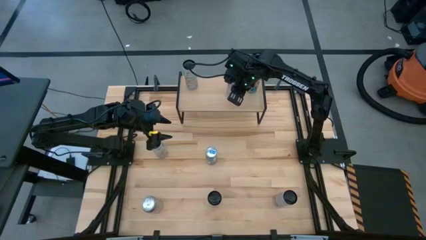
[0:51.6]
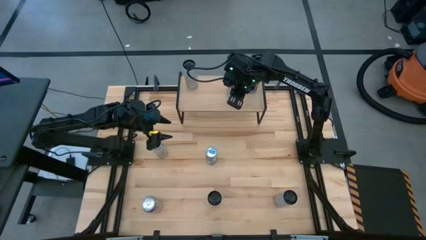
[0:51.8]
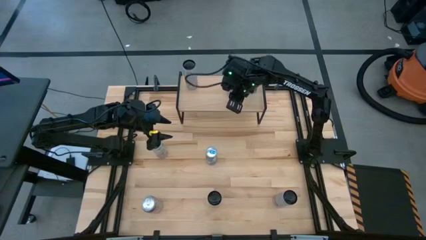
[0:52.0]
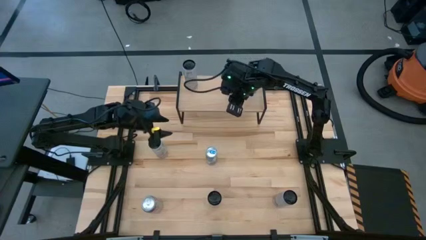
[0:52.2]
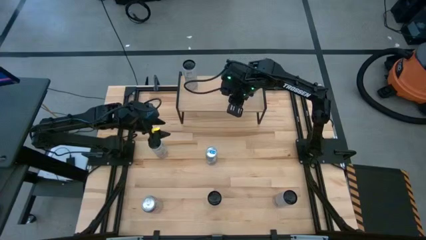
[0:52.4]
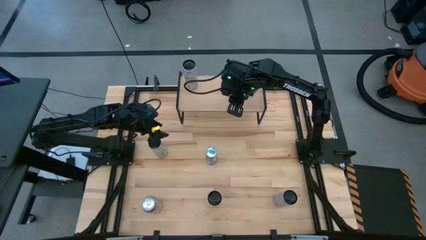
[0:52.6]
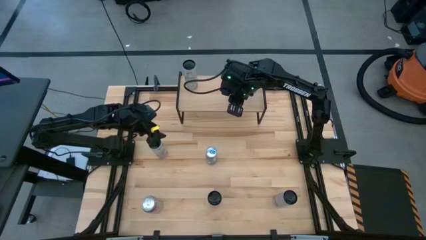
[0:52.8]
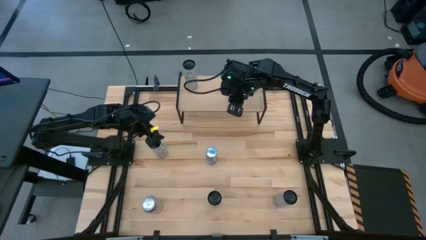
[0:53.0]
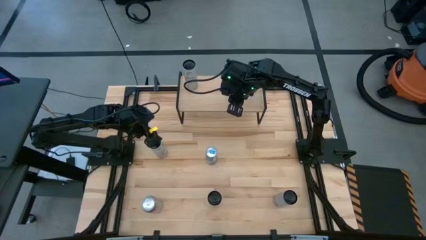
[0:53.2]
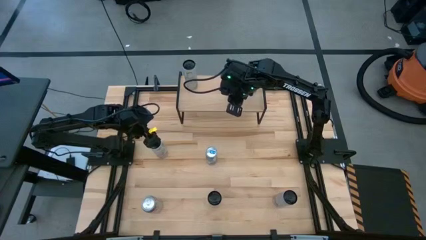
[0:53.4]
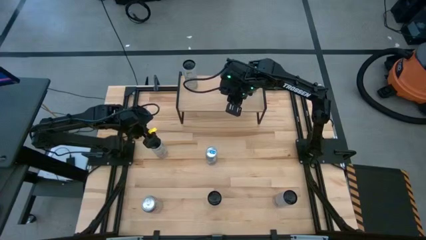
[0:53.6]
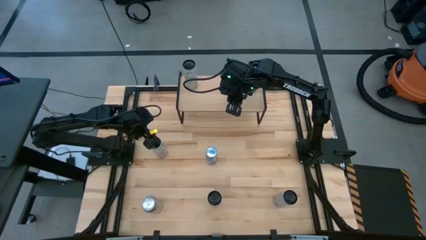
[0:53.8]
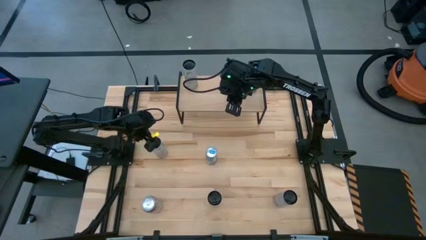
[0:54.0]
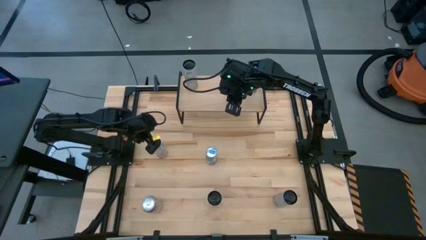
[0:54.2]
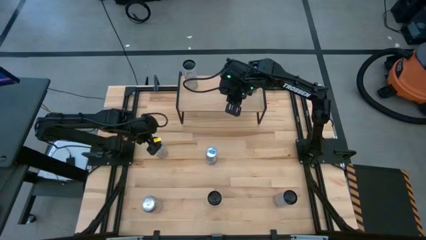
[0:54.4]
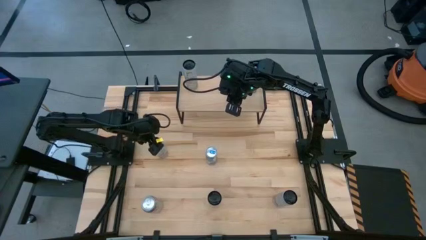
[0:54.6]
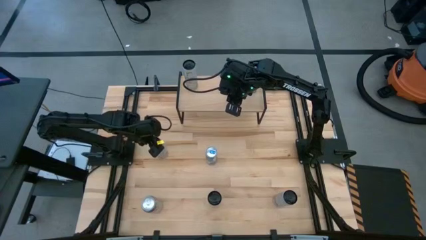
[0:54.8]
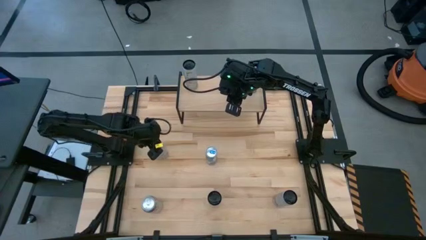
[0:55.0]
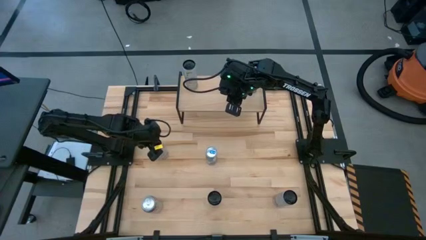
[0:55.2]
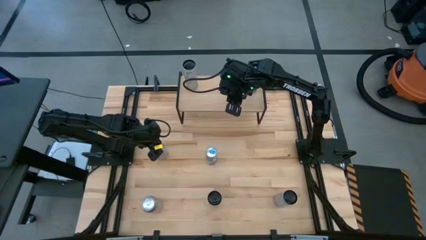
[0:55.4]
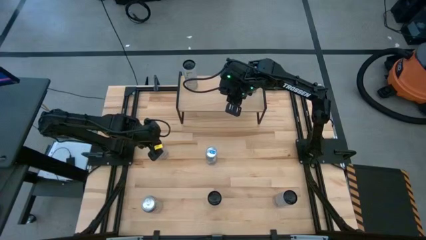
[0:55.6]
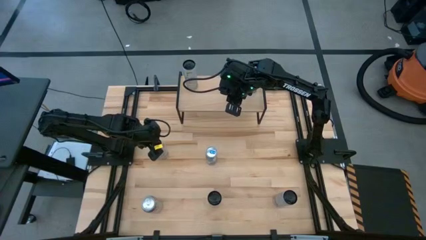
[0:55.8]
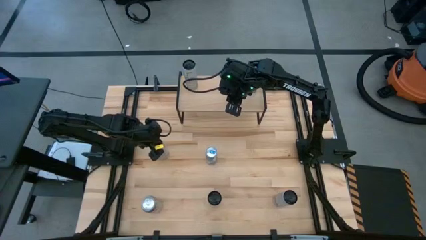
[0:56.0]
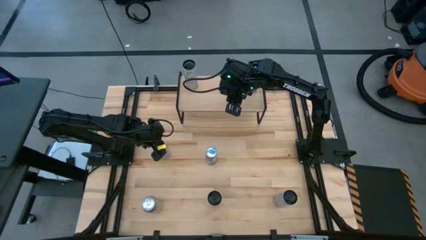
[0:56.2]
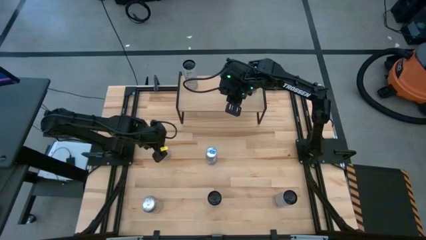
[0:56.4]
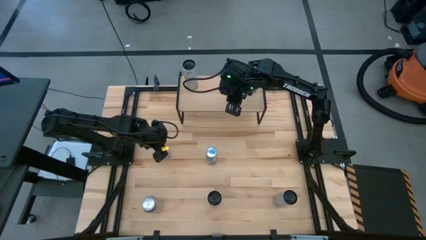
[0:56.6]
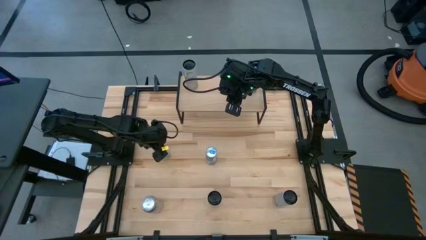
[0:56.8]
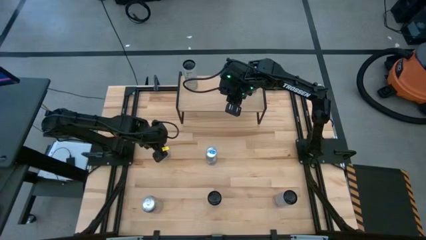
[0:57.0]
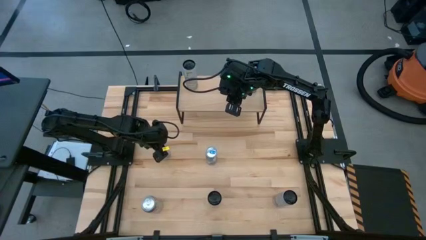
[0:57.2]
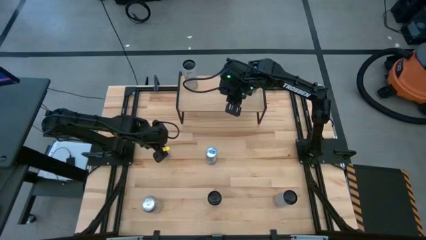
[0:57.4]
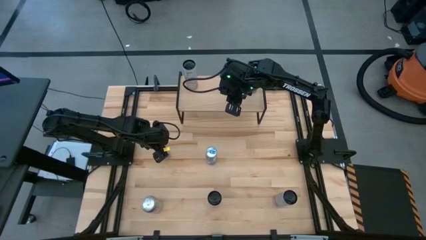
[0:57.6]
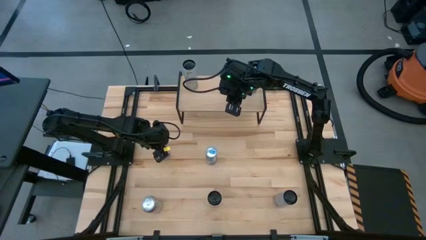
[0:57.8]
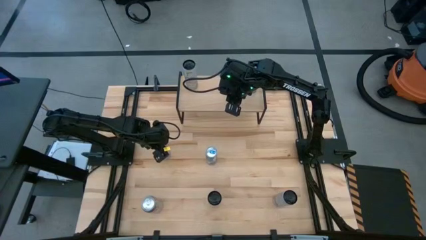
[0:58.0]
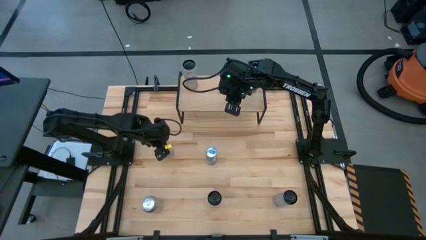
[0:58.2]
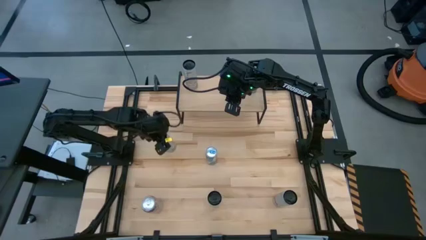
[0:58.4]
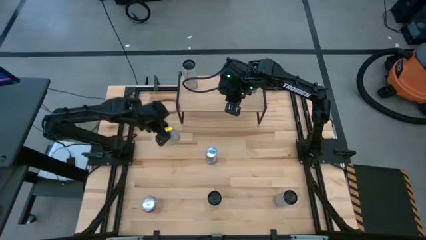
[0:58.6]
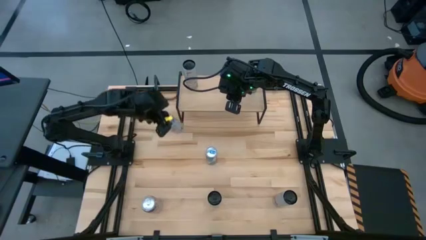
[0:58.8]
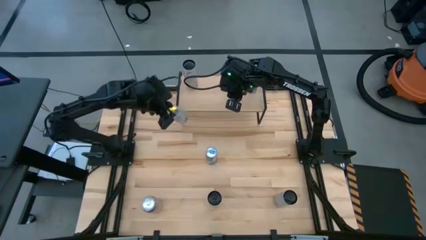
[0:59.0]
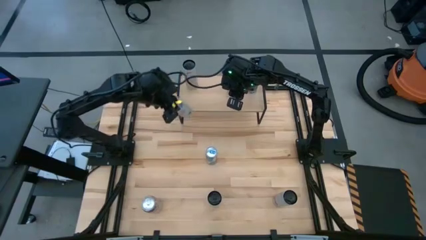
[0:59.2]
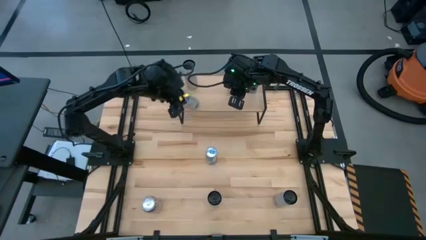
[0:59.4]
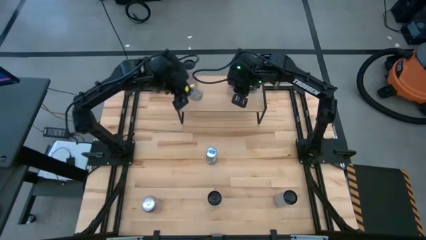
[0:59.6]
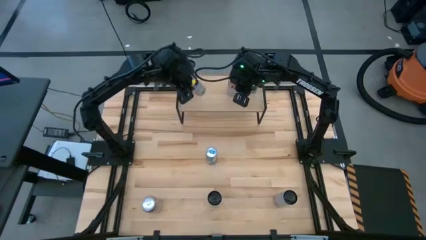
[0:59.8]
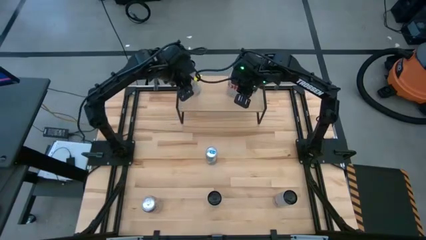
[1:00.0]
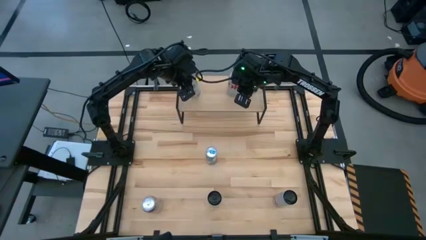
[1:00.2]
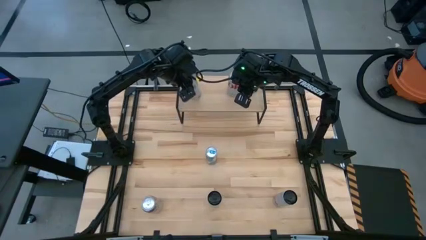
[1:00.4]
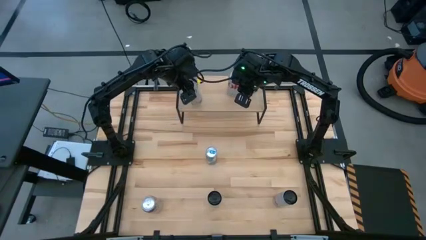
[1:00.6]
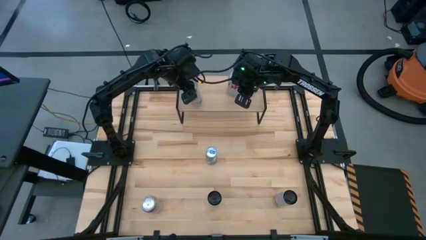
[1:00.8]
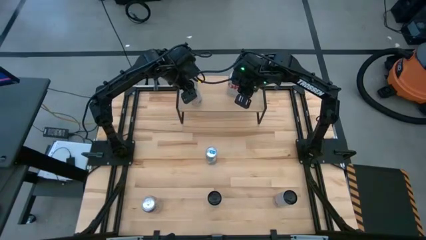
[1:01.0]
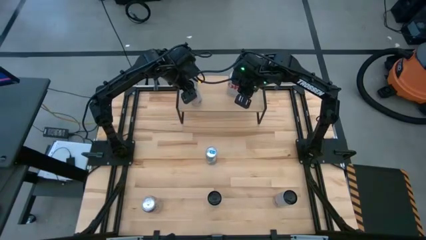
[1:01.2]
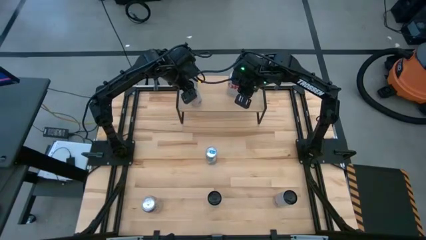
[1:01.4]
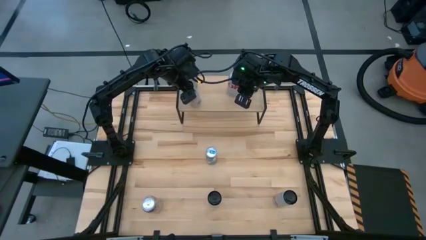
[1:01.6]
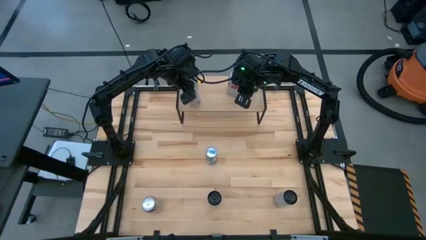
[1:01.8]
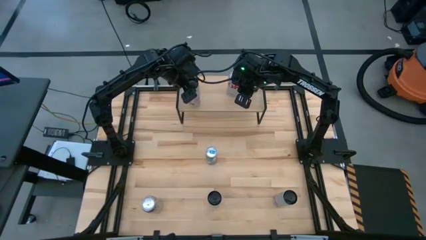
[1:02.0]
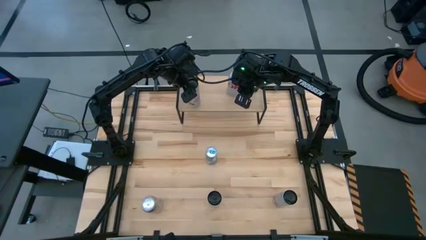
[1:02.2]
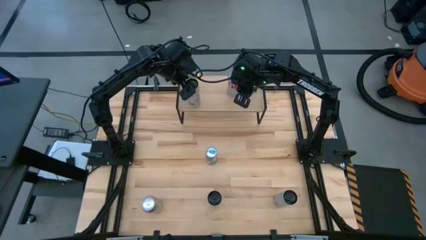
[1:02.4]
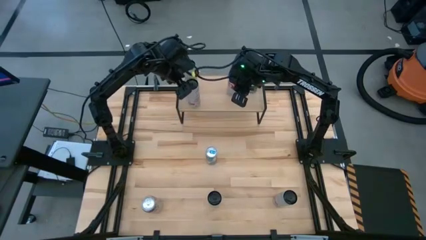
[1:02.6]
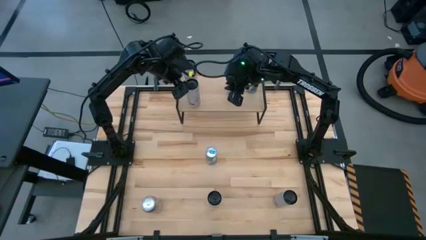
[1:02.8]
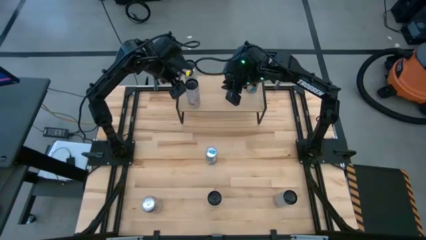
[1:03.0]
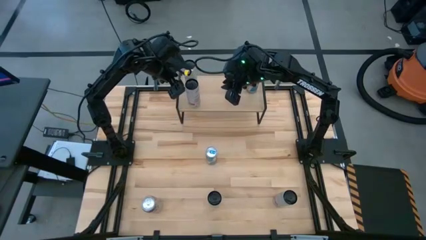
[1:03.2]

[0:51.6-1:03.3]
Task: Place canned beverage on shelf
Put the white soda can on the shelf
